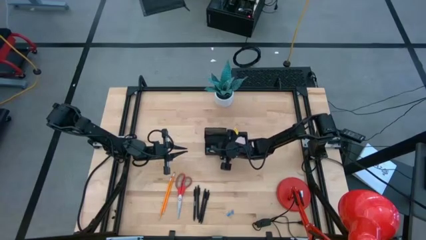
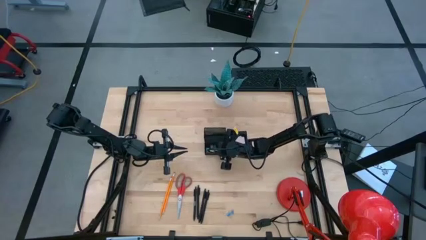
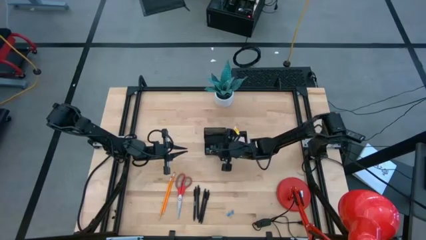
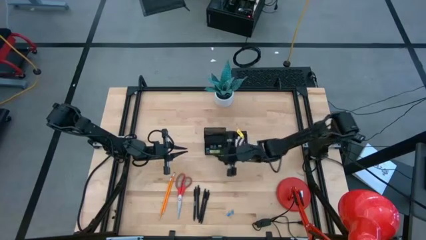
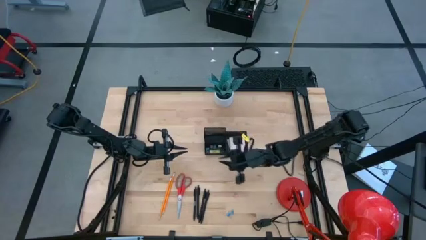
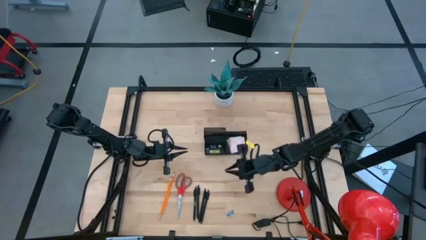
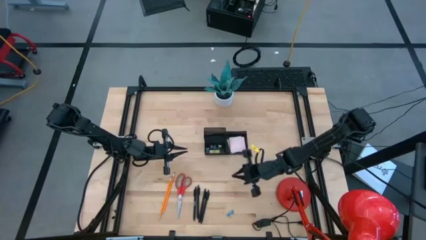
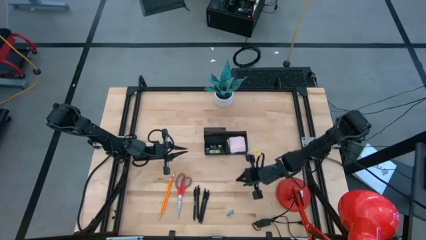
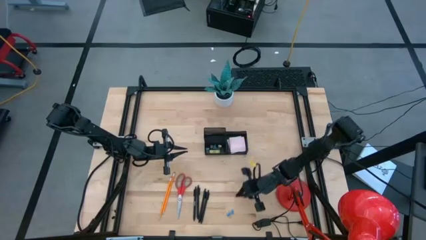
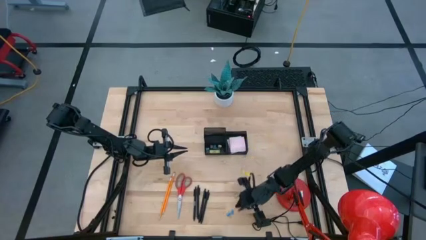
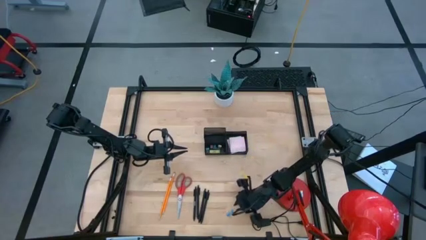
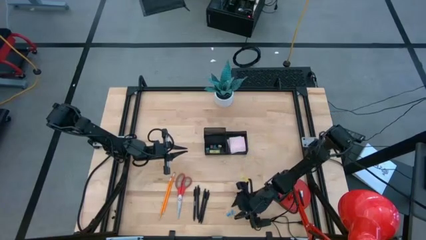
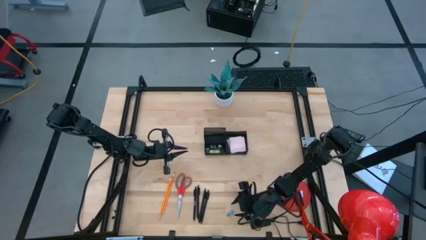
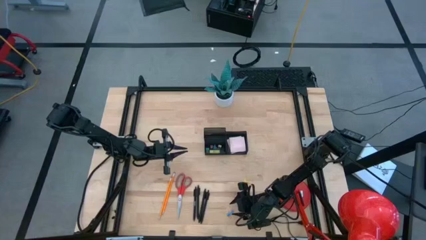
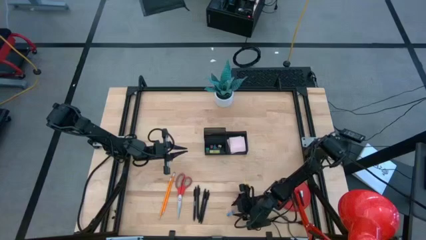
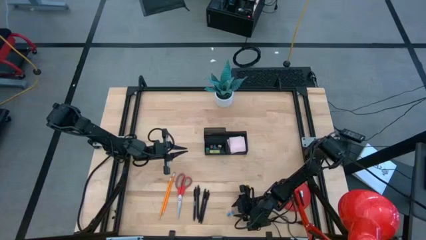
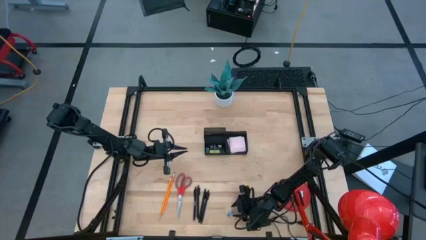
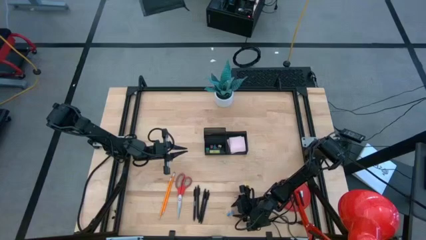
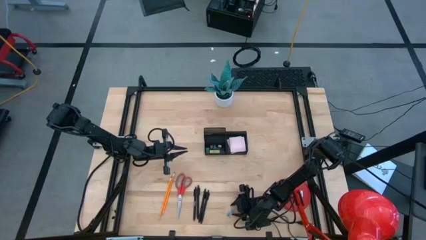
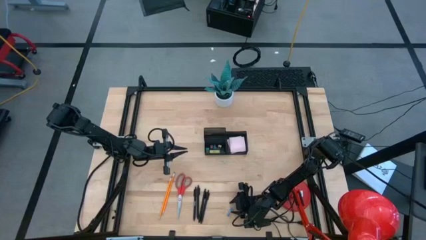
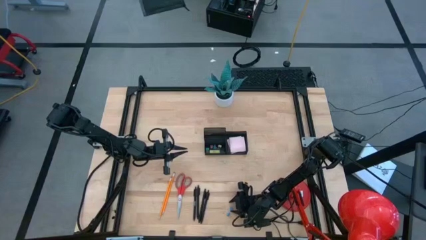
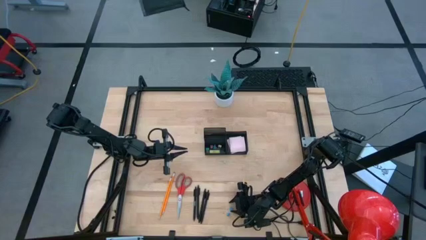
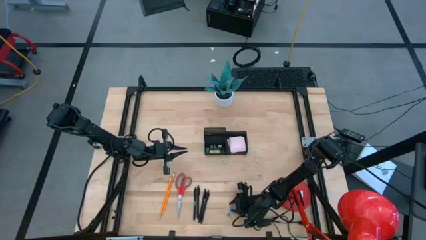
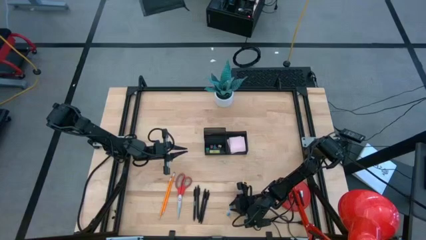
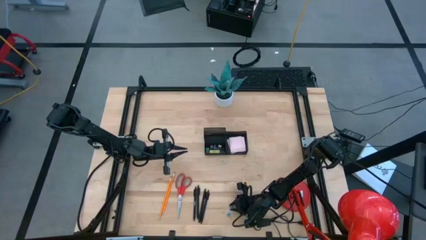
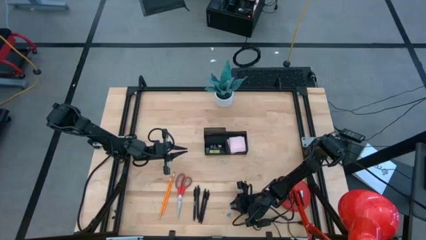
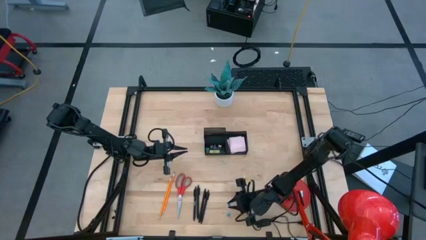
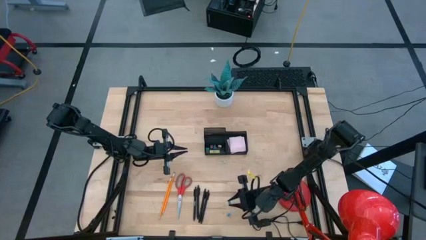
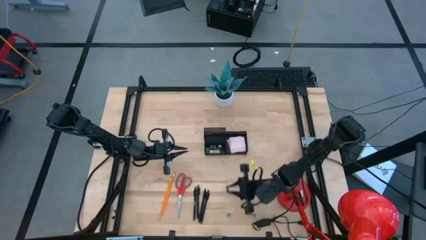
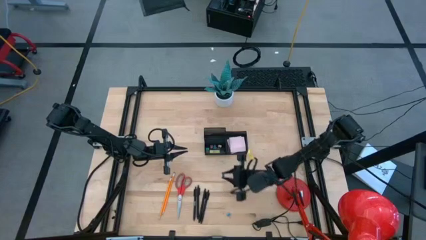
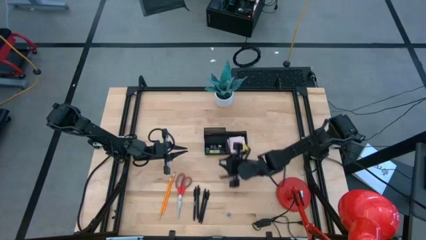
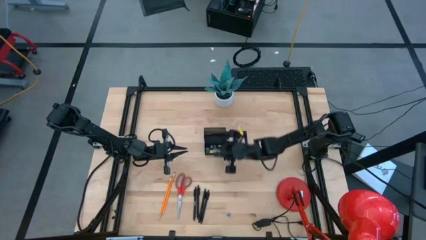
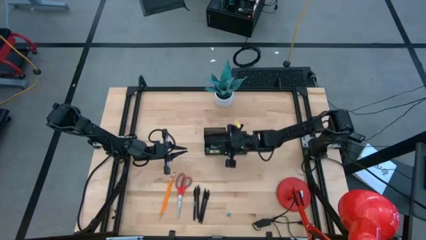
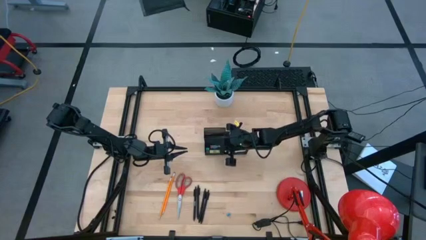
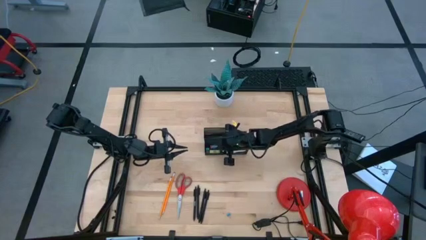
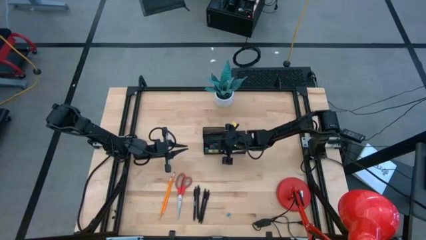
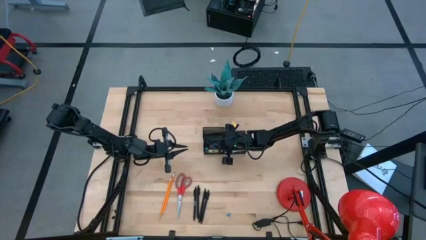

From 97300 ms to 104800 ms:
Task: Pick and place office supplies into organizer
Put the blue binder clip into the black desk organizer

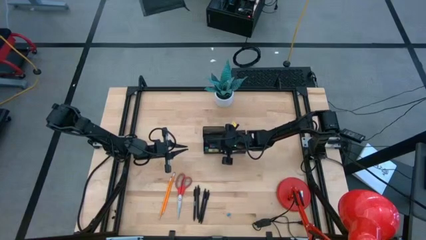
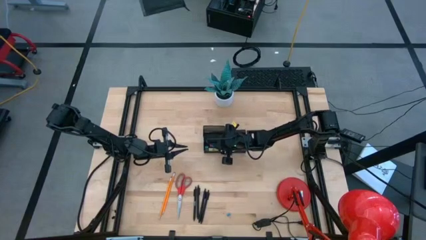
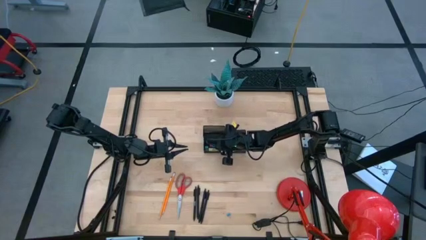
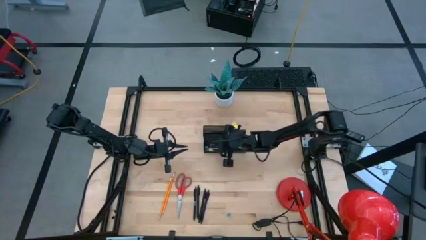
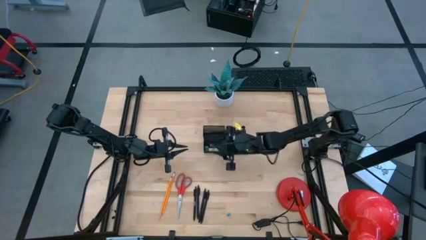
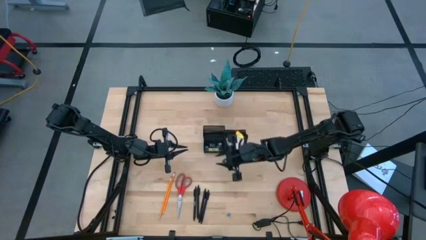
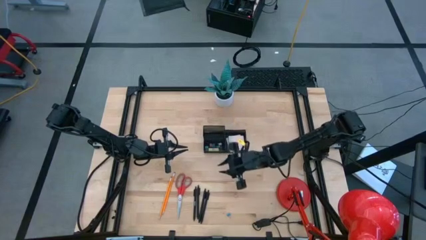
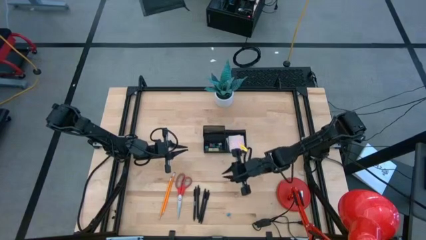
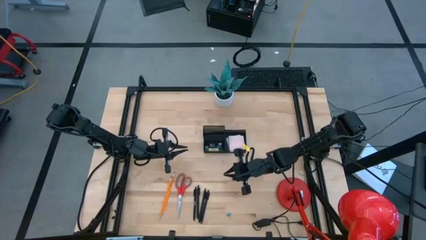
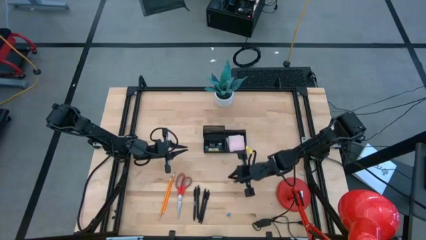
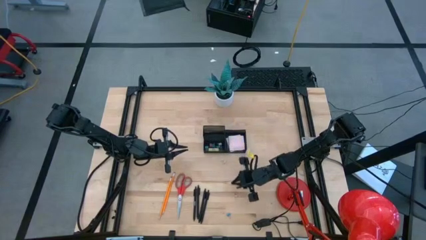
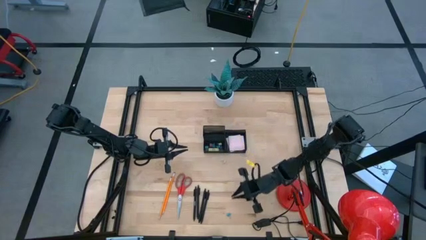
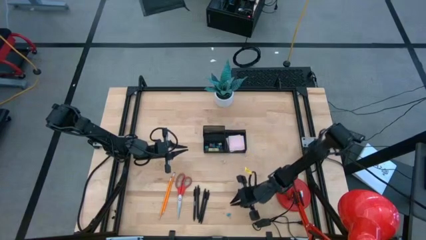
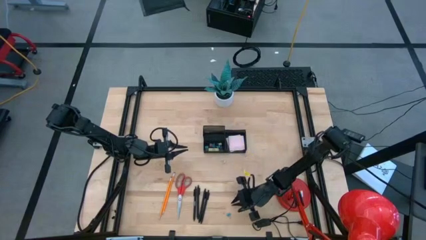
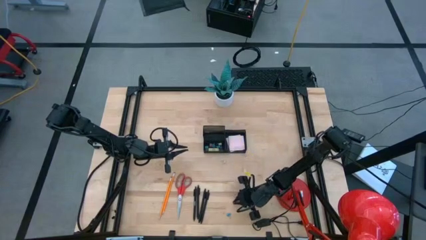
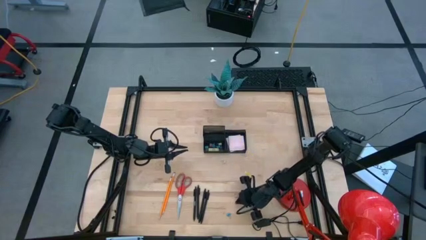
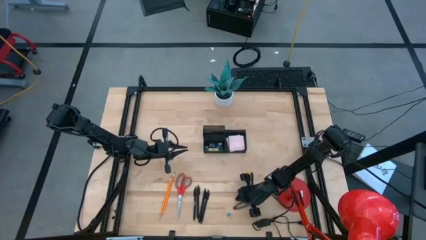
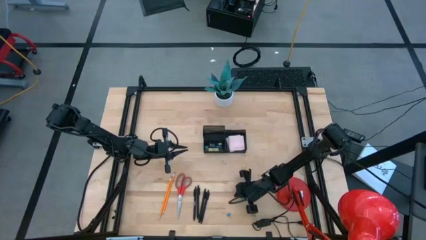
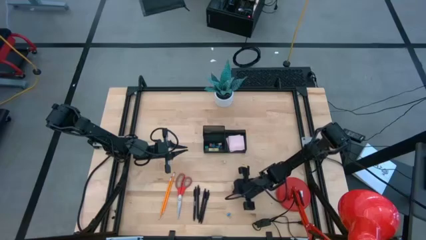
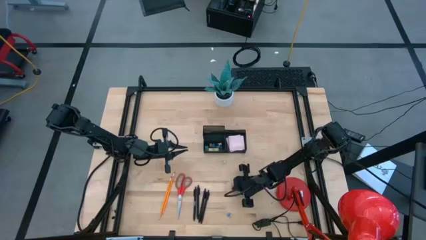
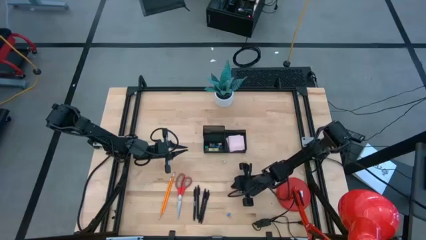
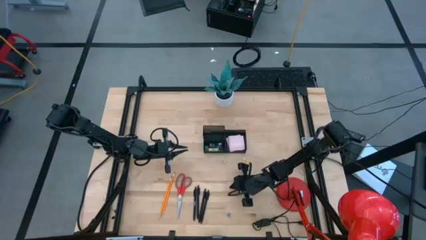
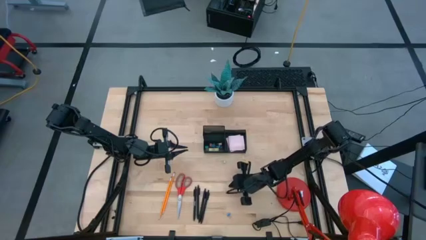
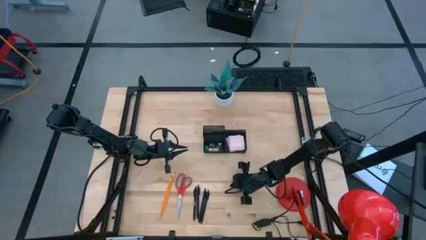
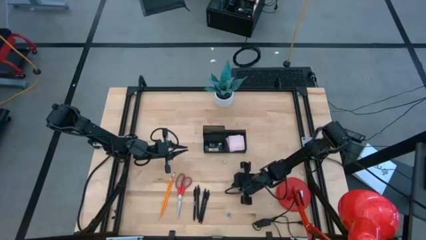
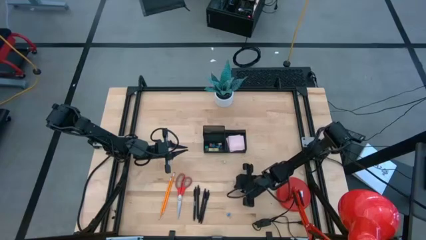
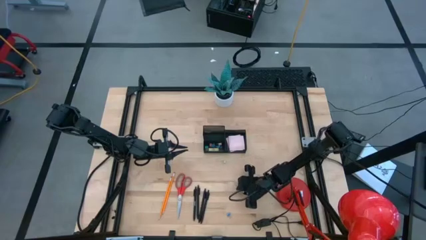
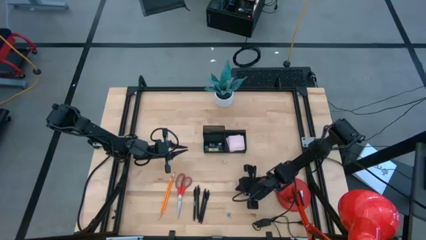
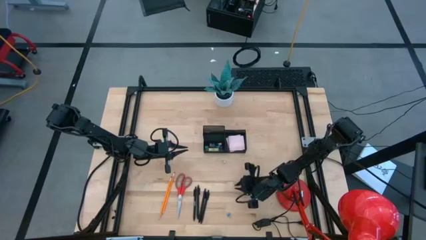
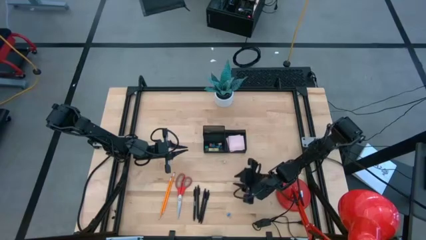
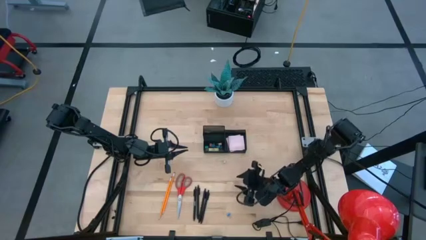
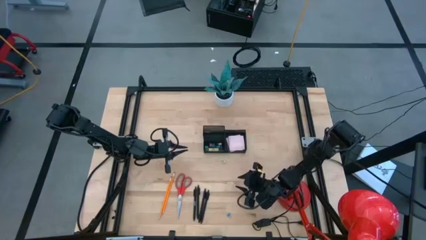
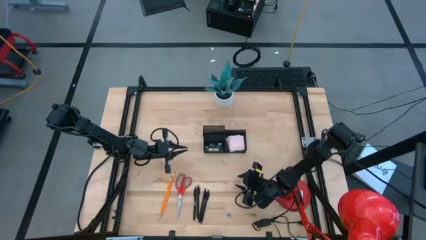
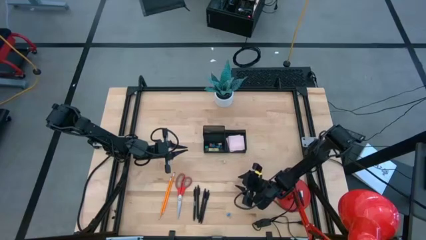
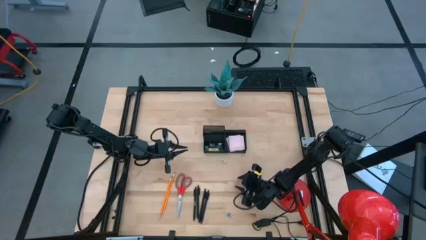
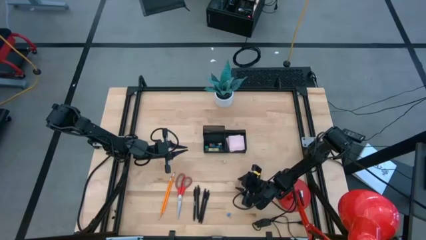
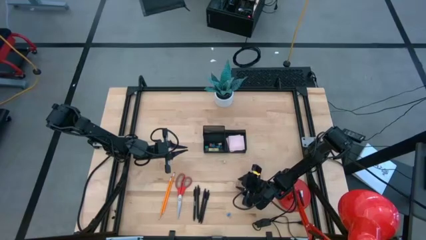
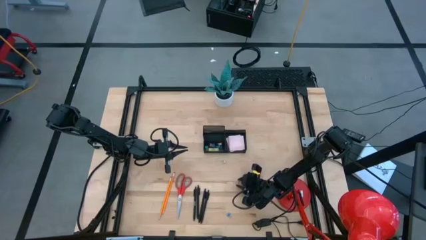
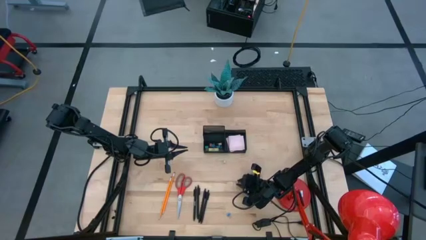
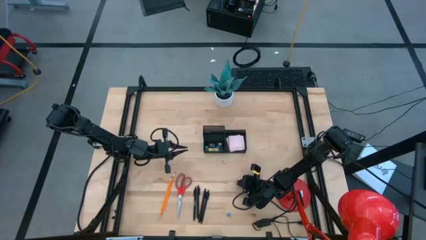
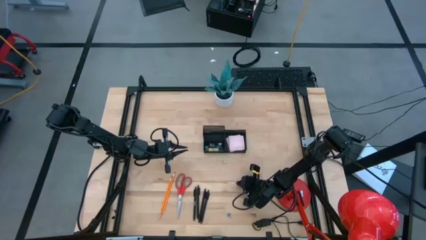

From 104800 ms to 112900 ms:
Put the pink binder clip into the black desk organizer

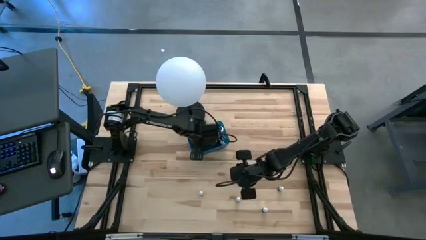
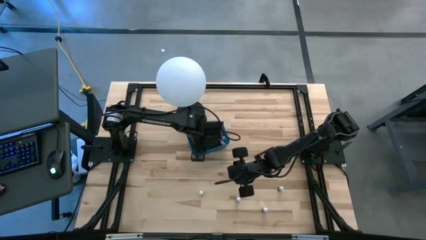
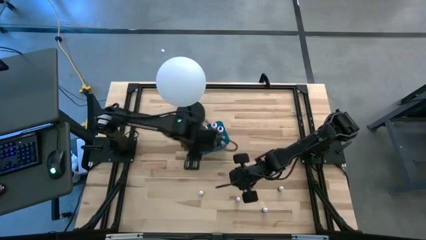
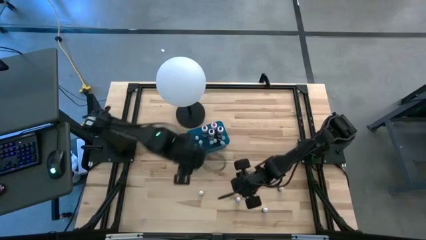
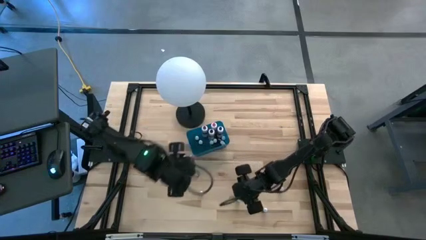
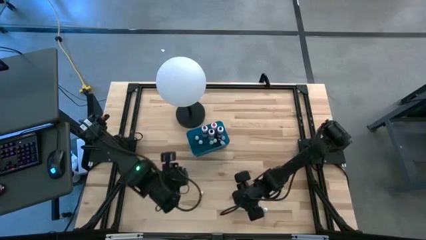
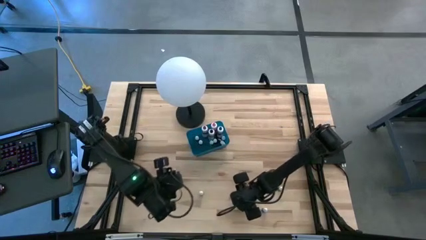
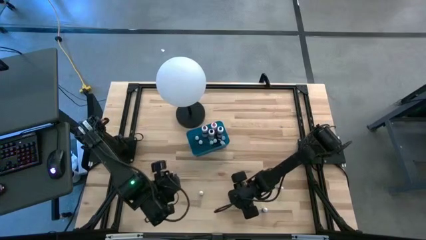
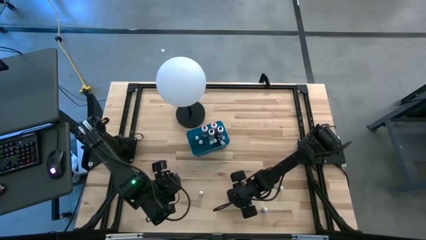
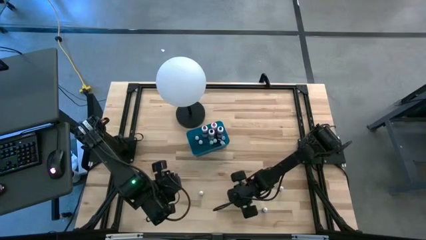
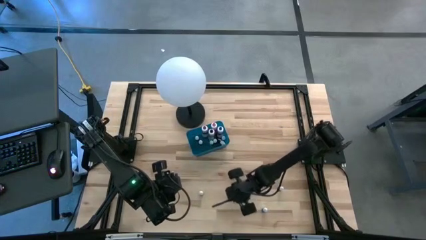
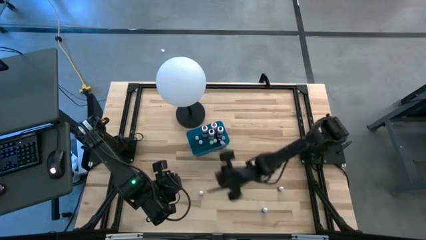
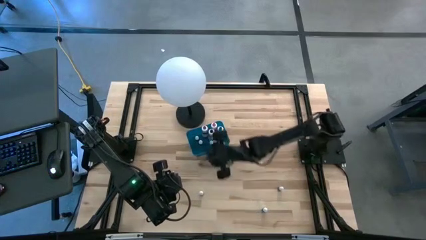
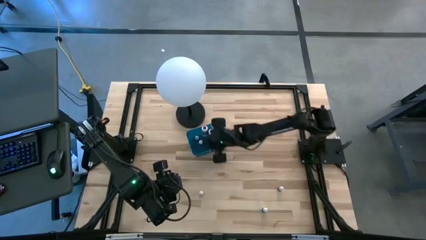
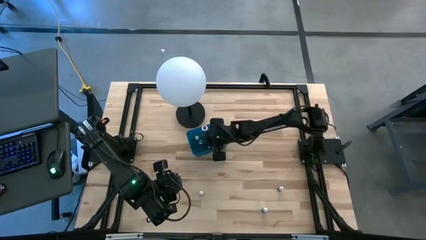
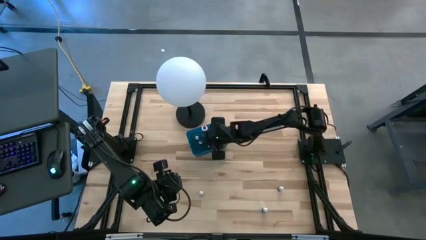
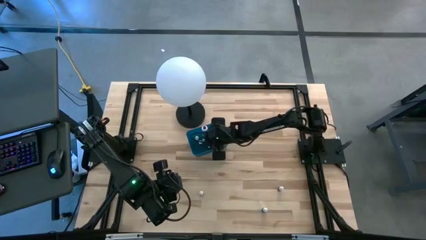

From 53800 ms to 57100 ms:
Task: Pick & Place food coloring
Put the small black food coloring bottle into the blue container
